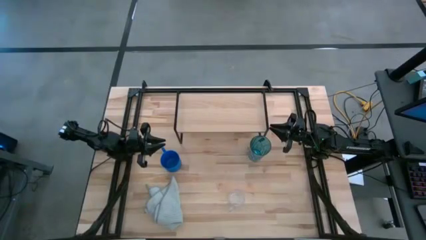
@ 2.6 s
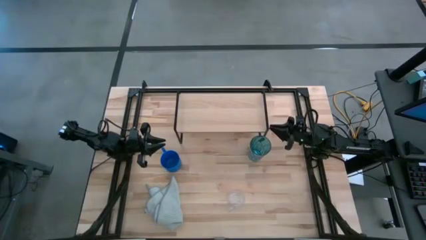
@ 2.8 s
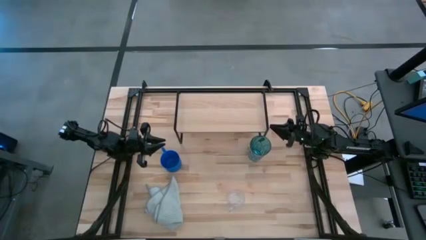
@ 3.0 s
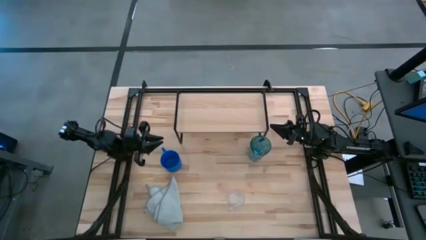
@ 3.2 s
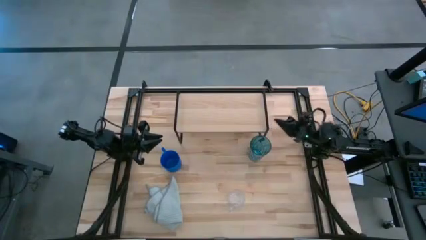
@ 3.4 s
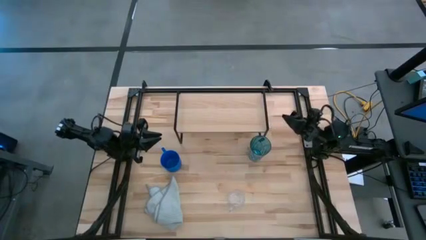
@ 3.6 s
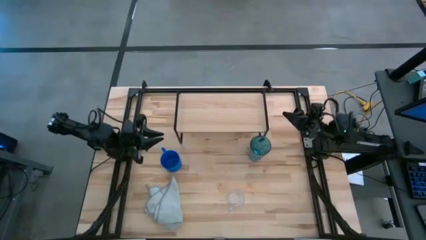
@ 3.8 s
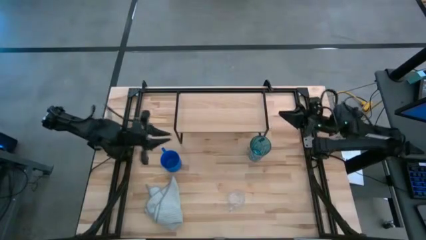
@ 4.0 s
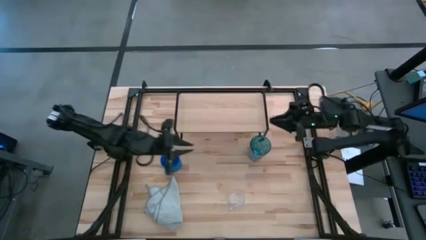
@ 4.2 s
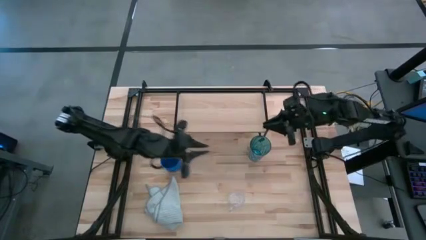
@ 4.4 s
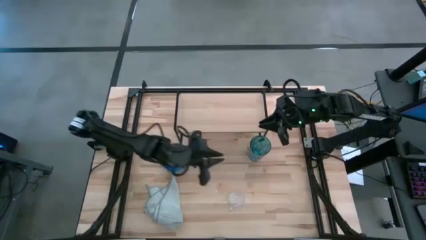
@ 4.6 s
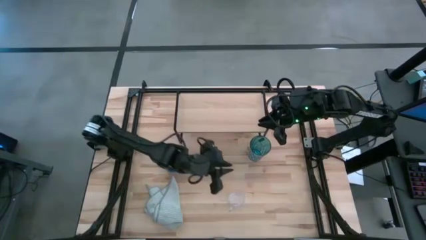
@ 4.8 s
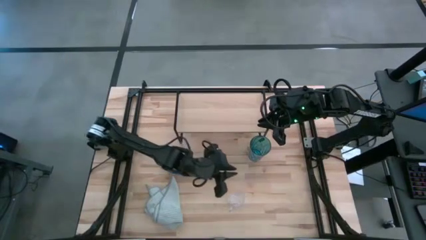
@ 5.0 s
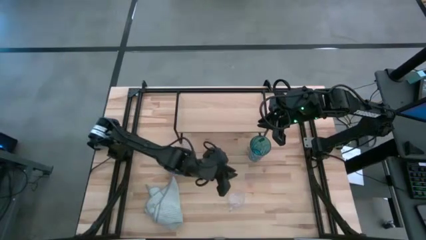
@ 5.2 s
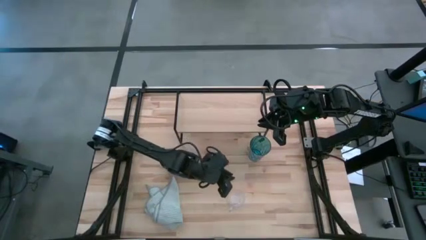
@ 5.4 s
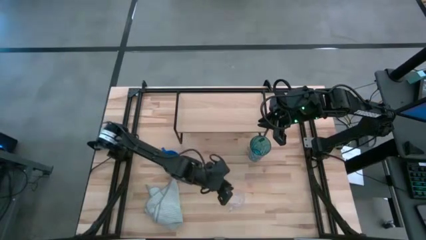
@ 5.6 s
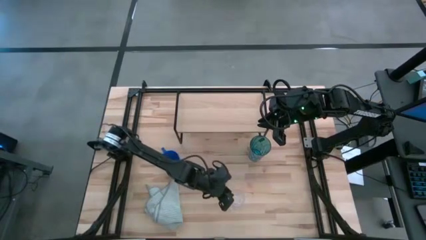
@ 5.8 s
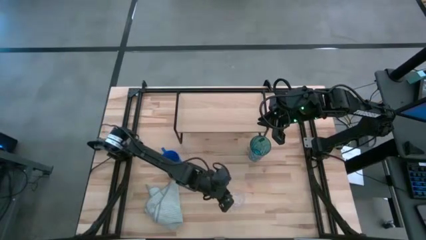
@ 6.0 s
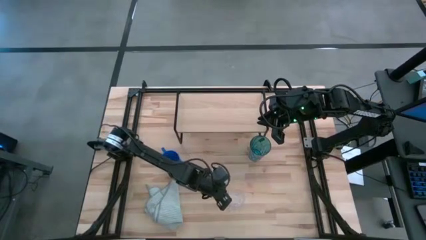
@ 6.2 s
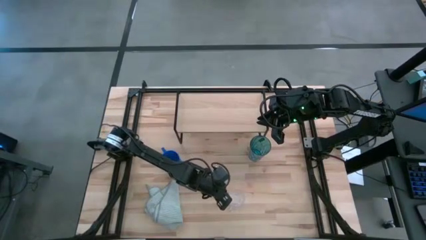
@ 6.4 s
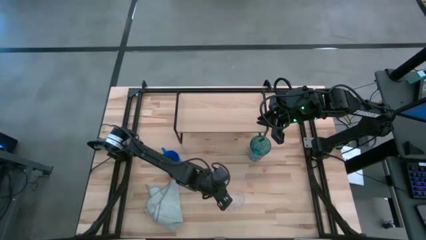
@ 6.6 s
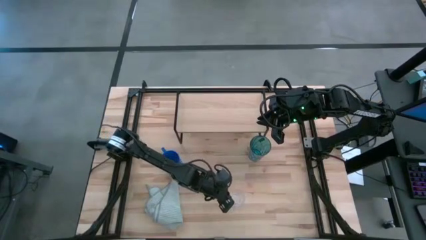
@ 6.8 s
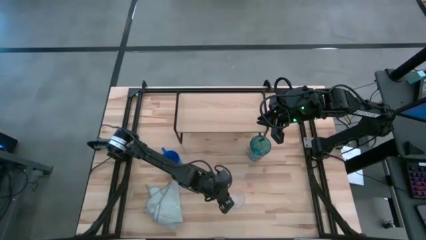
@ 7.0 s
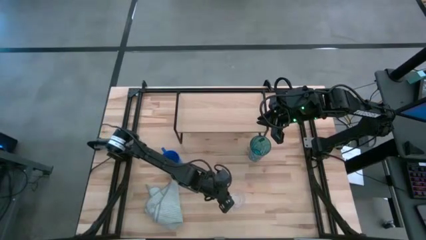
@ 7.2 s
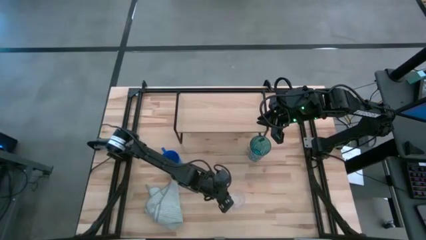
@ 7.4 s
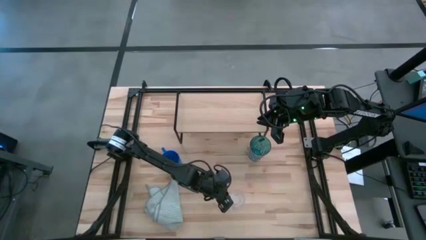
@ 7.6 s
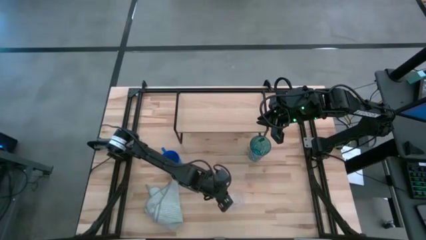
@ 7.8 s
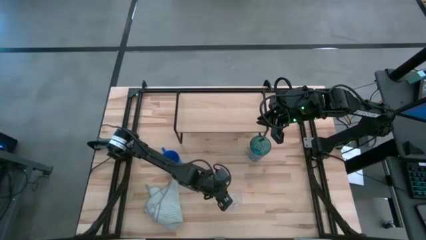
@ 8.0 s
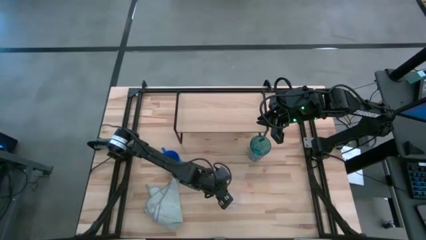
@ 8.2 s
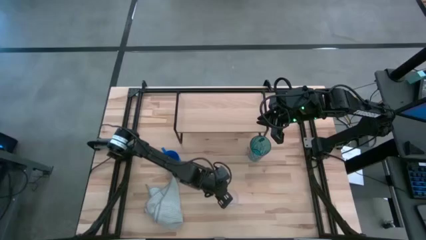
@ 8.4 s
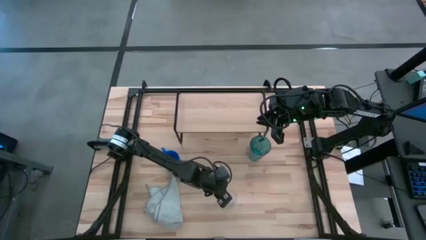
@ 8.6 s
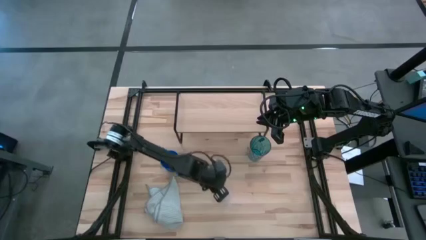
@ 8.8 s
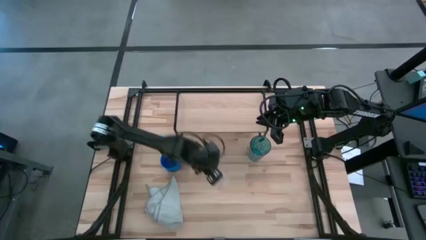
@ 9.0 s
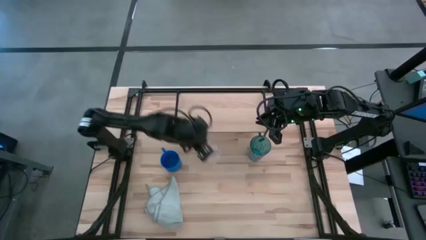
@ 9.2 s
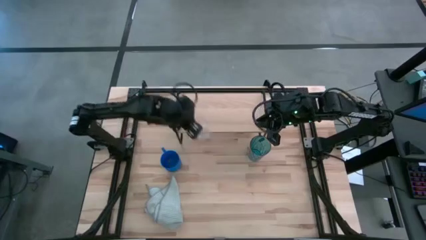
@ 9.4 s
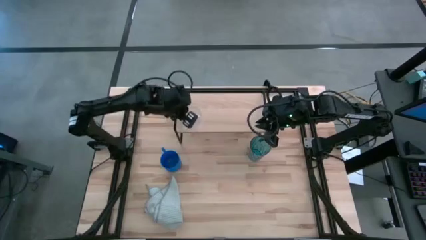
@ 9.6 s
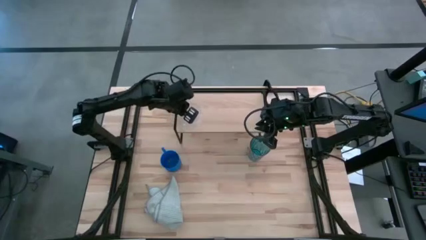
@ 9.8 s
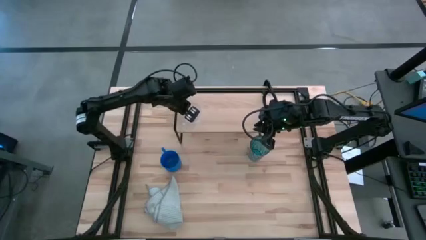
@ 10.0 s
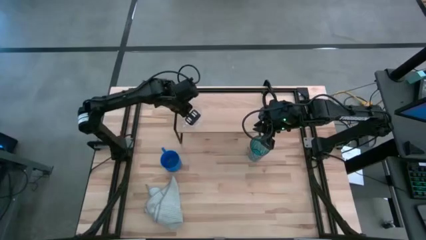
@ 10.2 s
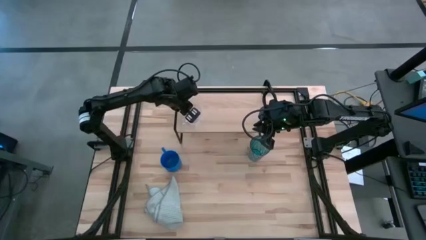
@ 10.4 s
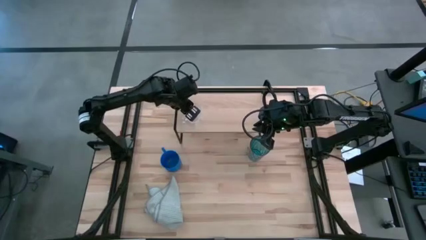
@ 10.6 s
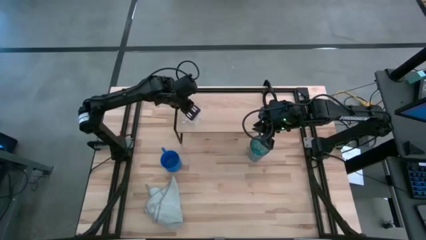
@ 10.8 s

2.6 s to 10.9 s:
Task: Stack small to large cups/mugs on shelf
Put the transparent mug on the shelf

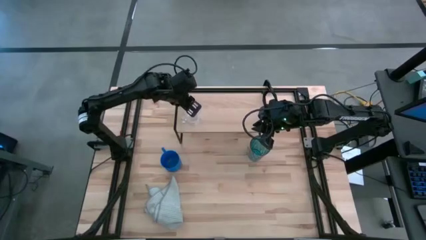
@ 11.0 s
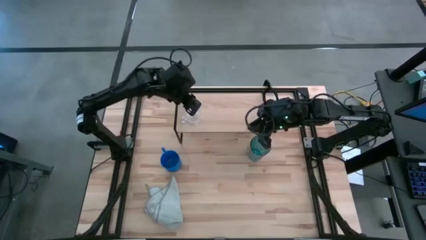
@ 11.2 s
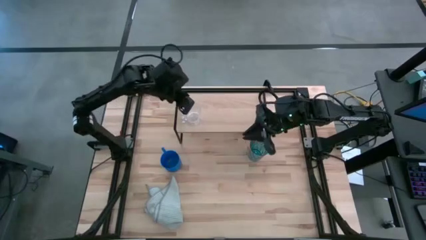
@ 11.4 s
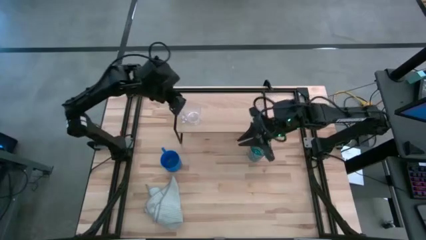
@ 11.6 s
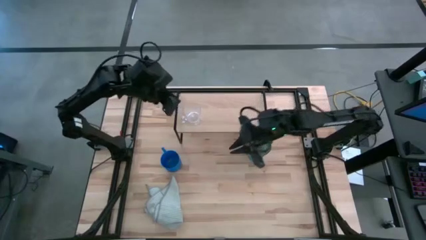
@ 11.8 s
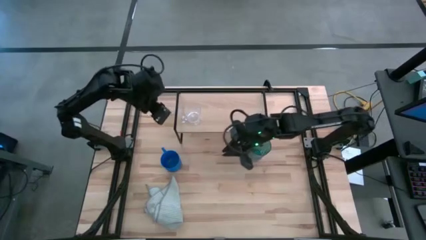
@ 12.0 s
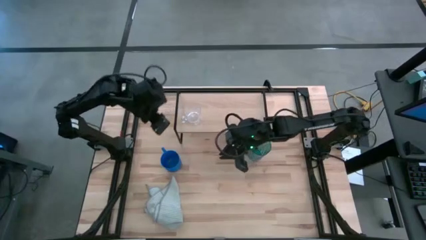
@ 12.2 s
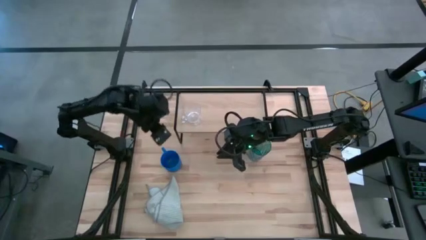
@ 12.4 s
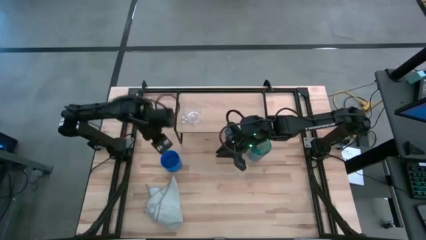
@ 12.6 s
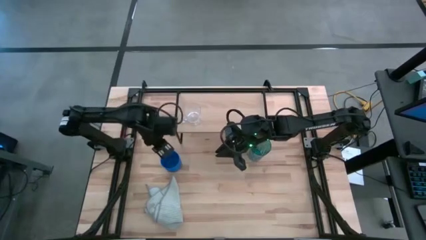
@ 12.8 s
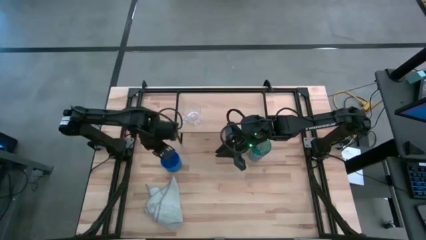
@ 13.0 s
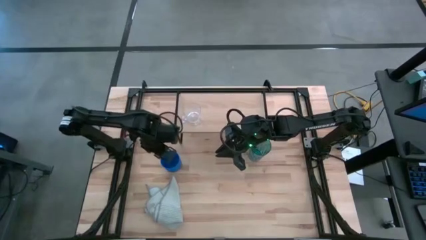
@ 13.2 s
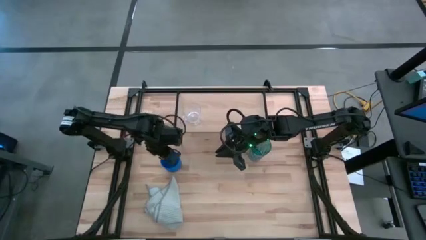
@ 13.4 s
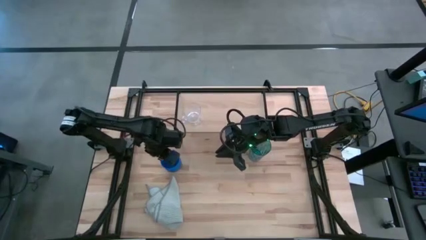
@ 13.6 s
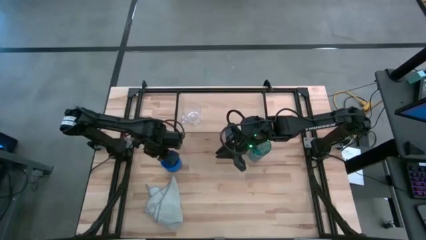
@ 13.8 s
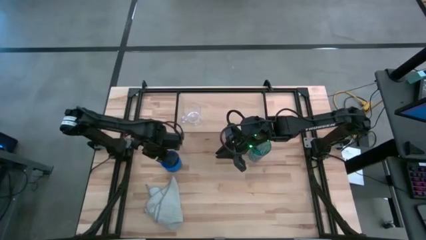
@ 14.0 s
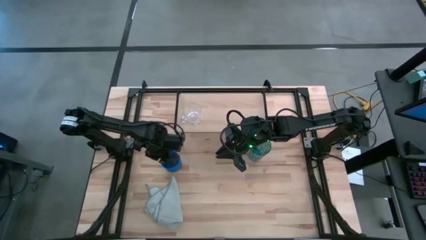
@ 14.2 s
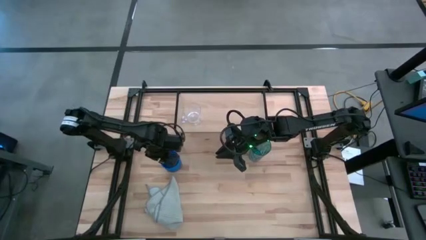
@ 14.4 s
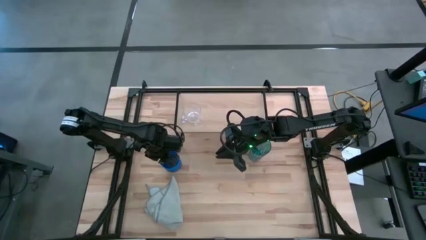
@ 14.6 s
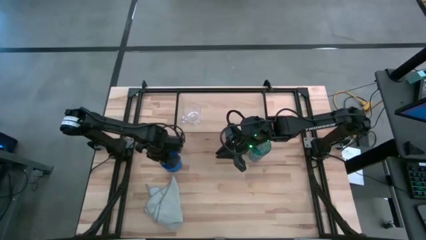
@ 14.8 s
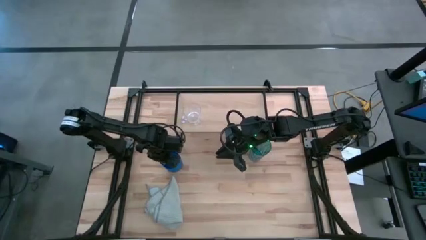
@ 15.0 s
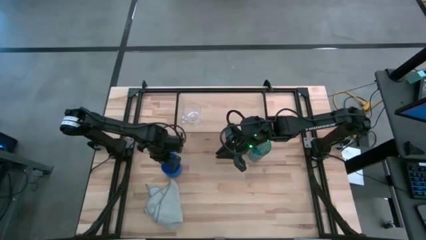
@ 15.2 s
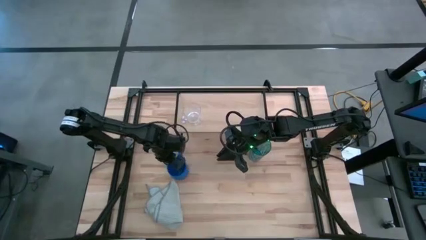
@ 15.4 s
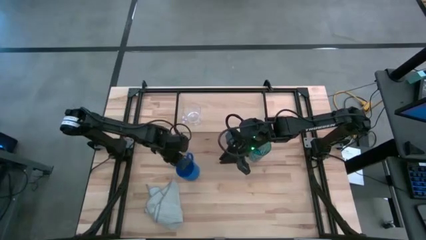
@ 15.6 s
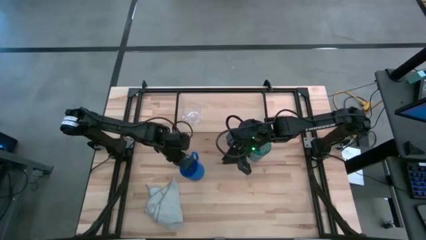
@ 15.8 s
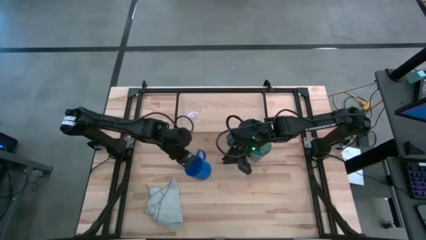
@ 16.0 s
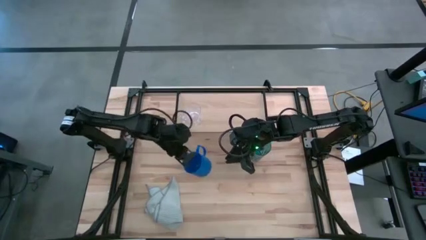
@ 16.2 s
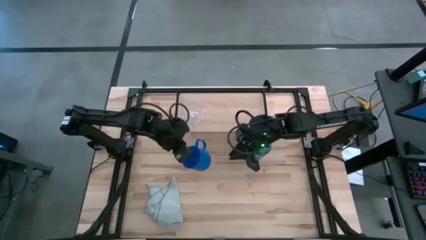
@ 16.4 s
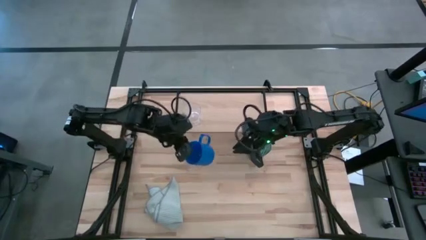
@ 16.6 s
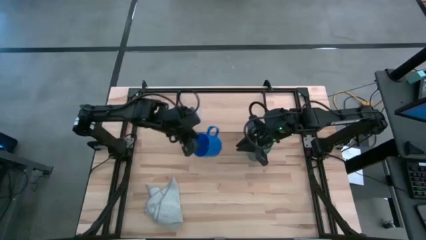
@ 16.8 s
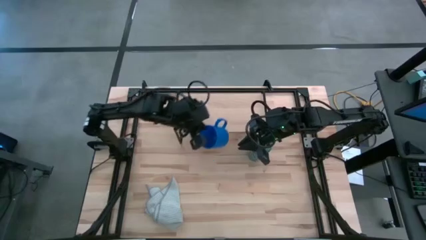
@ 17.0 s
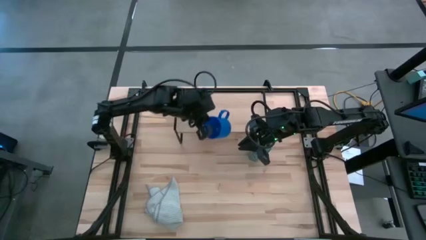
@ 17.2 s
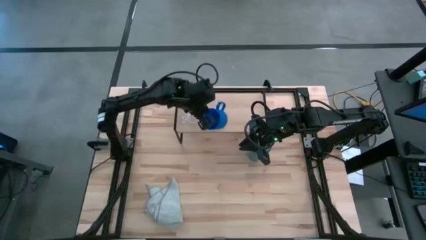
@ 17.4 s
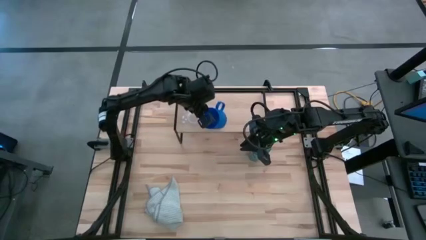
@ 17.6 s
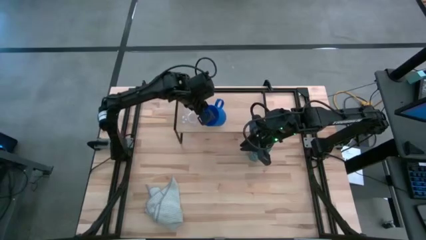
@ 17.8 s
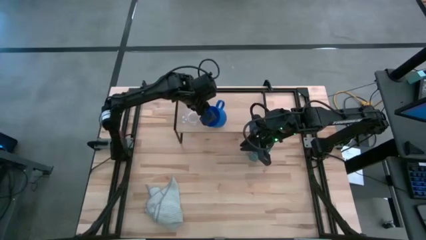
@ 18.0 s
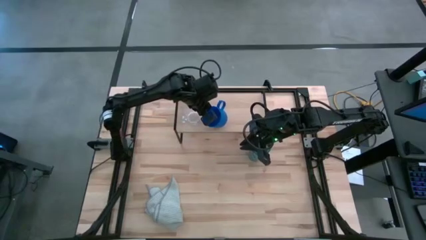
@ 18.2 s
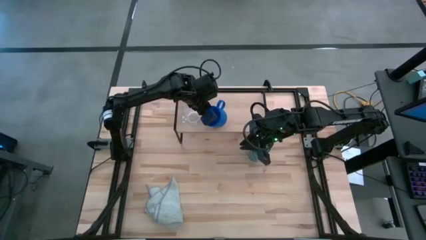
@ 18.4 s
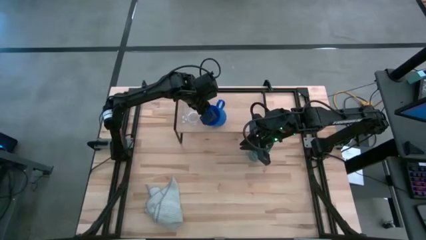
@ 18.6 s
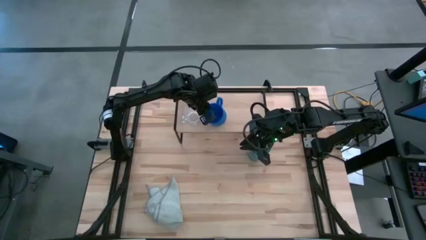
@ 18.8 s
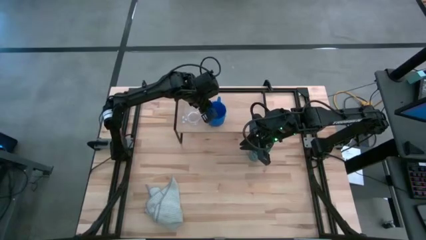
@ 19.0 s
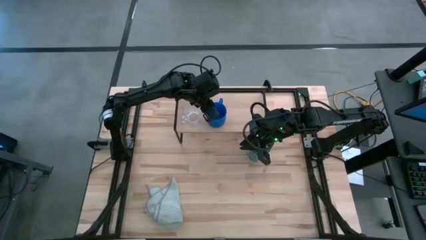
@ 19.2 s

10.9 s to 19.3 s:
Put the blue mug on the shelf
